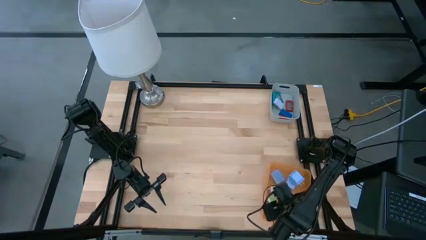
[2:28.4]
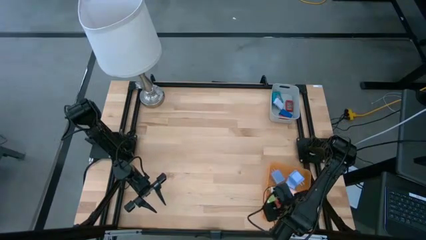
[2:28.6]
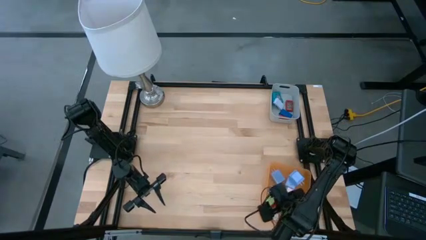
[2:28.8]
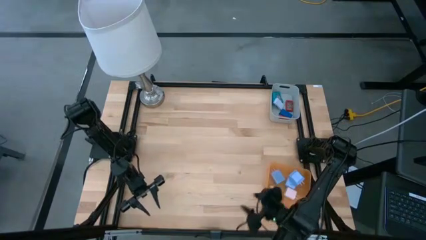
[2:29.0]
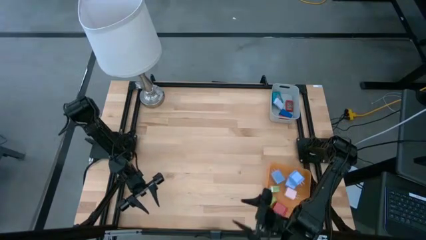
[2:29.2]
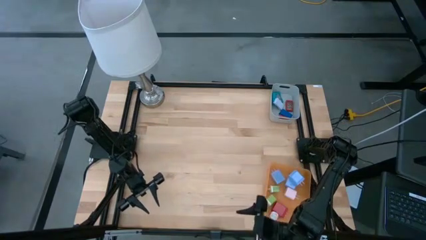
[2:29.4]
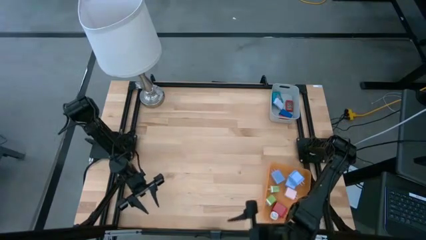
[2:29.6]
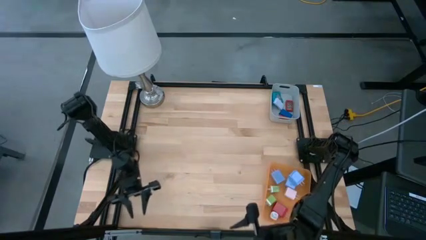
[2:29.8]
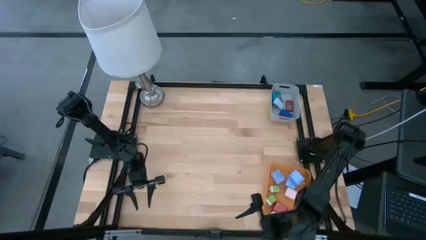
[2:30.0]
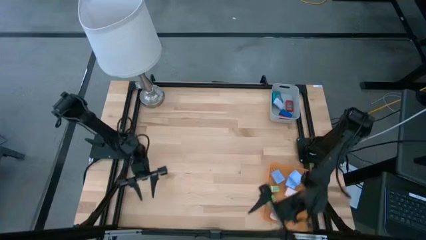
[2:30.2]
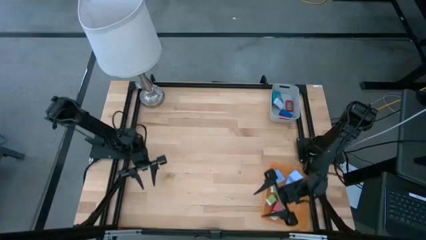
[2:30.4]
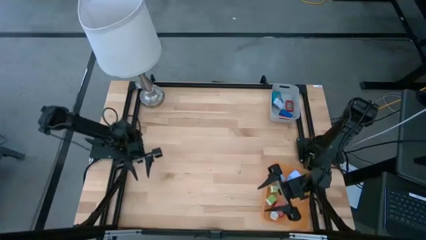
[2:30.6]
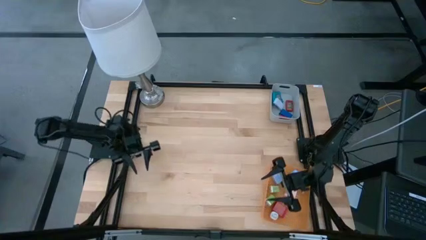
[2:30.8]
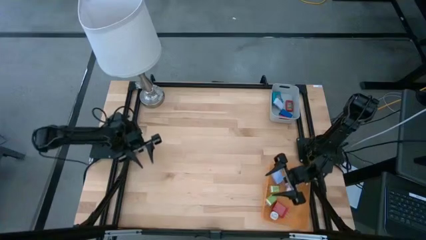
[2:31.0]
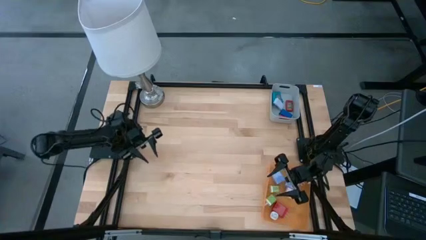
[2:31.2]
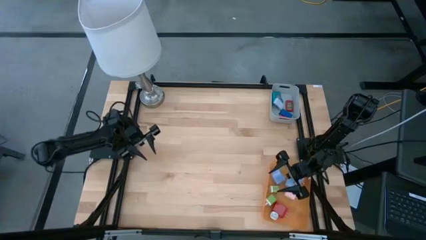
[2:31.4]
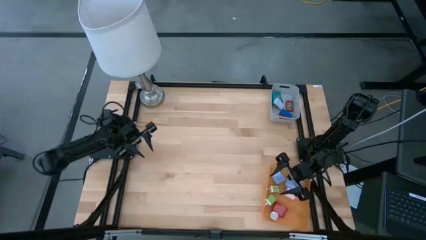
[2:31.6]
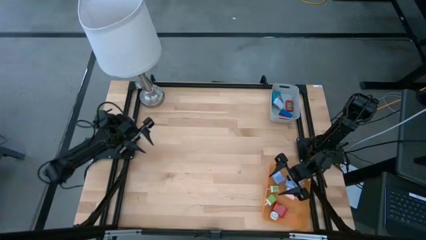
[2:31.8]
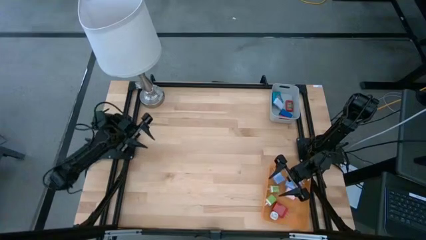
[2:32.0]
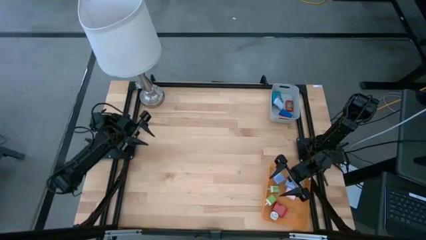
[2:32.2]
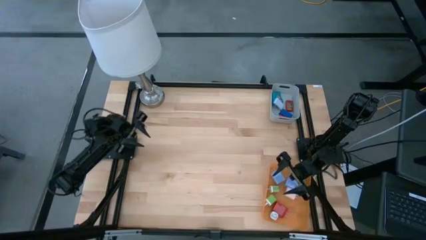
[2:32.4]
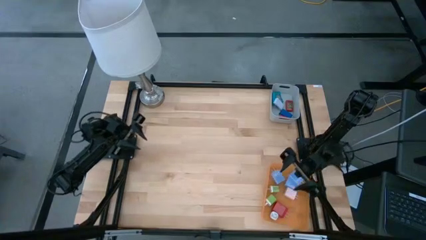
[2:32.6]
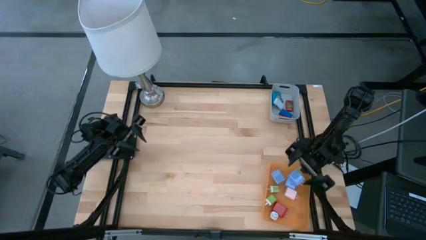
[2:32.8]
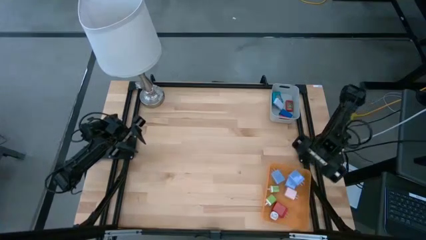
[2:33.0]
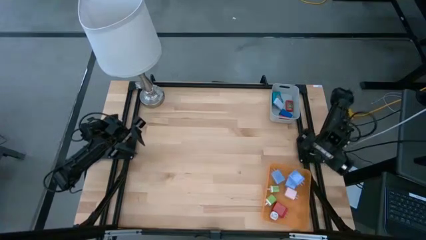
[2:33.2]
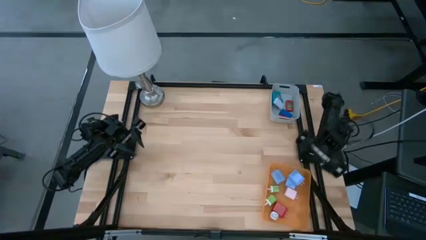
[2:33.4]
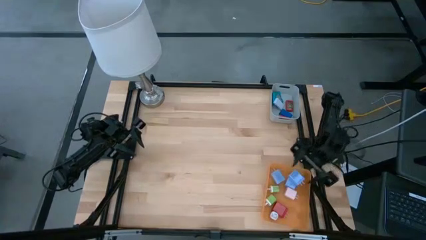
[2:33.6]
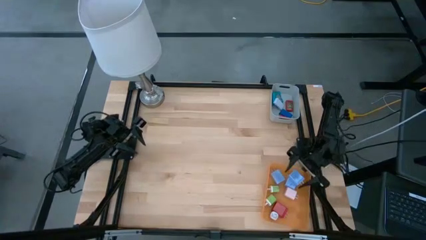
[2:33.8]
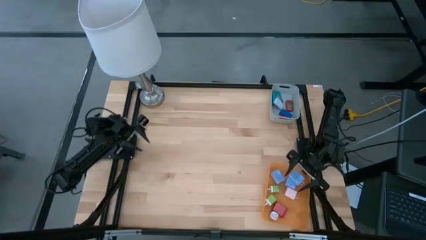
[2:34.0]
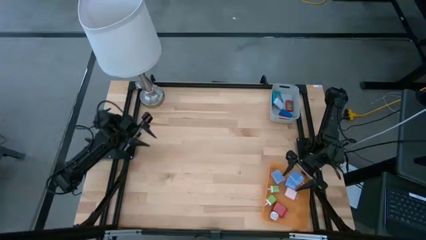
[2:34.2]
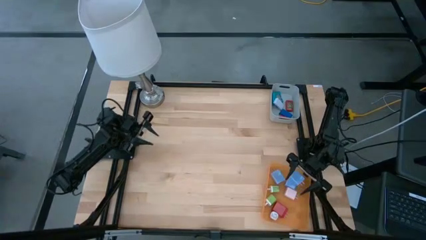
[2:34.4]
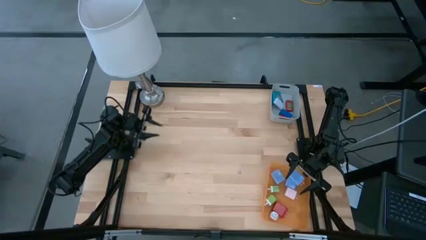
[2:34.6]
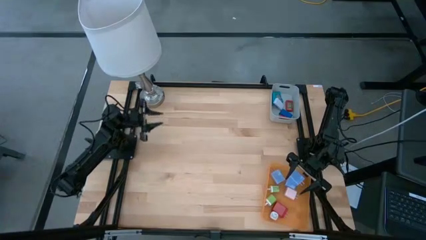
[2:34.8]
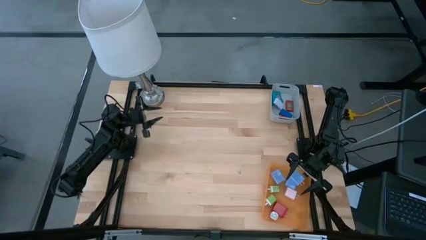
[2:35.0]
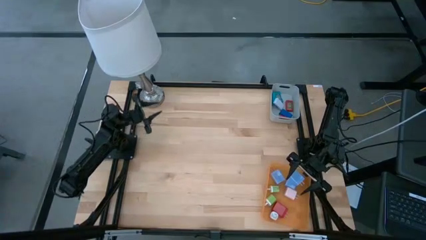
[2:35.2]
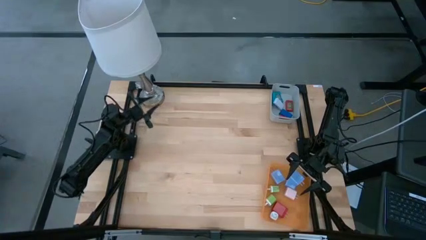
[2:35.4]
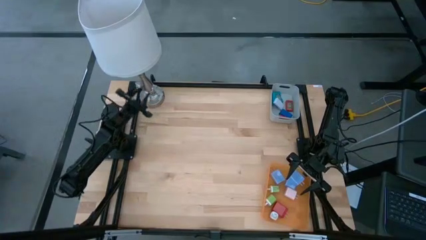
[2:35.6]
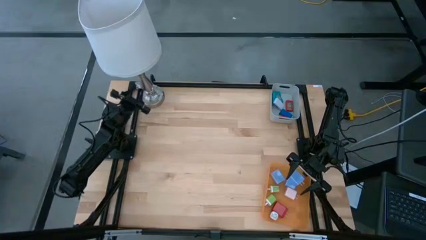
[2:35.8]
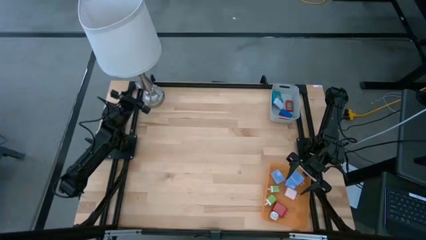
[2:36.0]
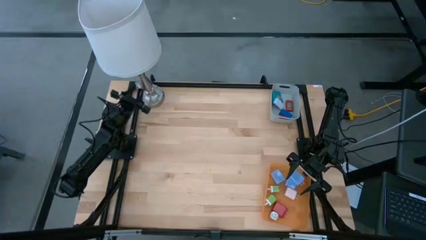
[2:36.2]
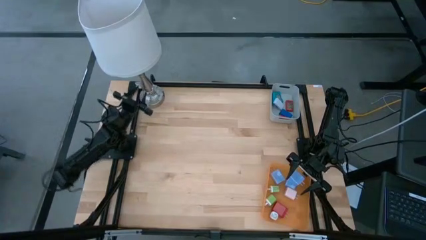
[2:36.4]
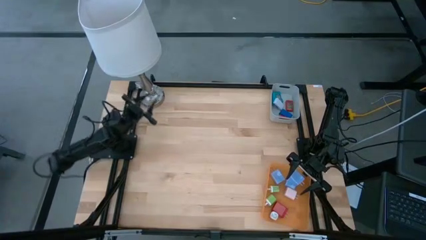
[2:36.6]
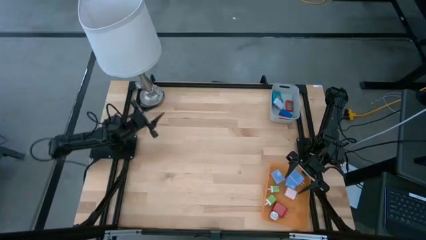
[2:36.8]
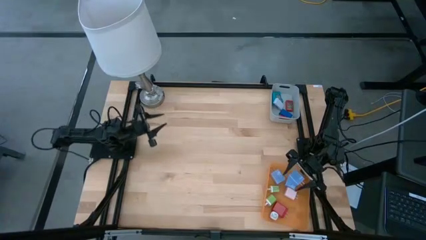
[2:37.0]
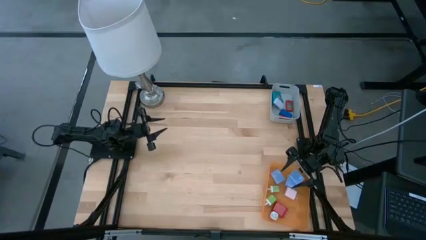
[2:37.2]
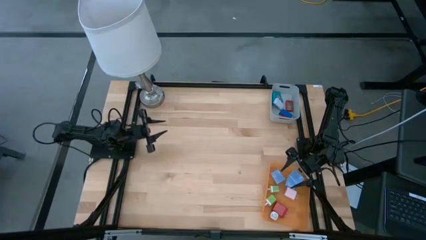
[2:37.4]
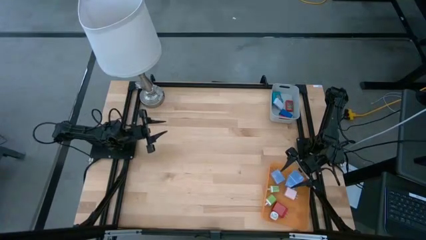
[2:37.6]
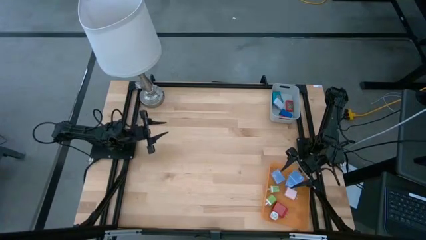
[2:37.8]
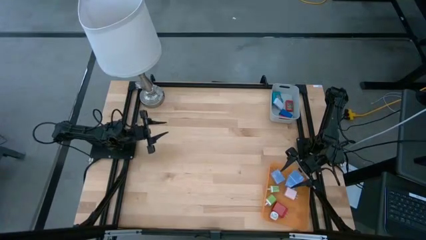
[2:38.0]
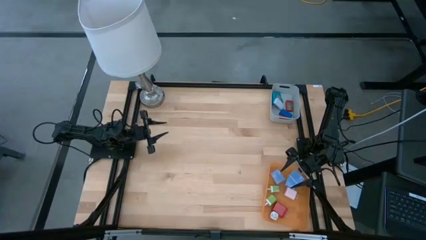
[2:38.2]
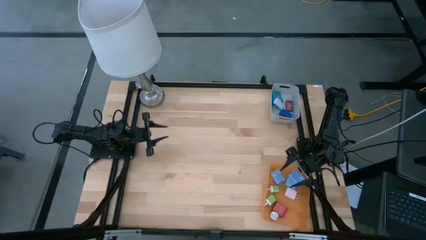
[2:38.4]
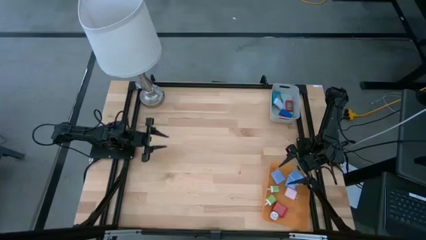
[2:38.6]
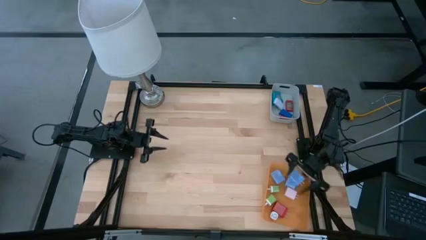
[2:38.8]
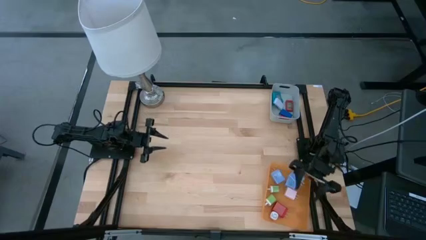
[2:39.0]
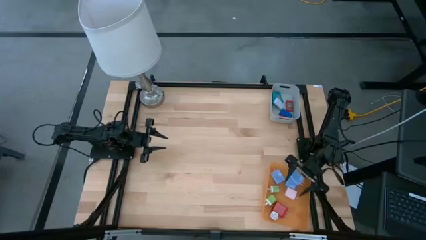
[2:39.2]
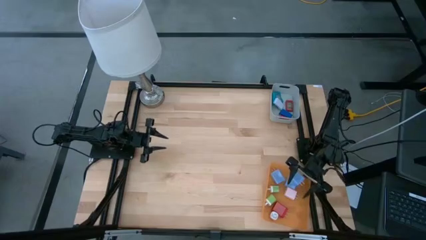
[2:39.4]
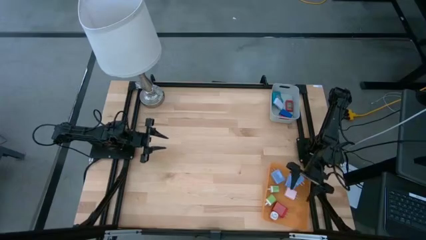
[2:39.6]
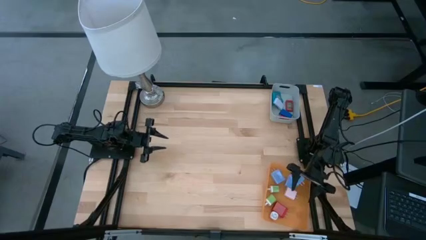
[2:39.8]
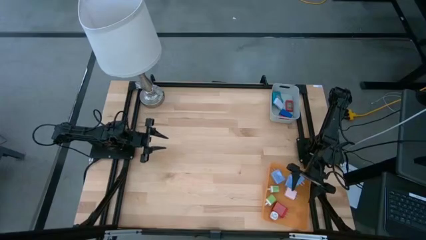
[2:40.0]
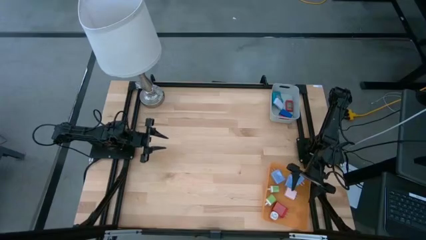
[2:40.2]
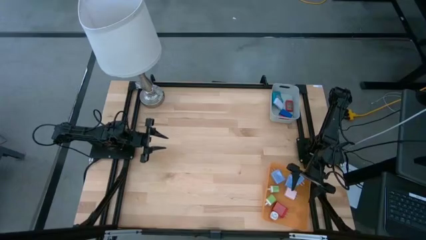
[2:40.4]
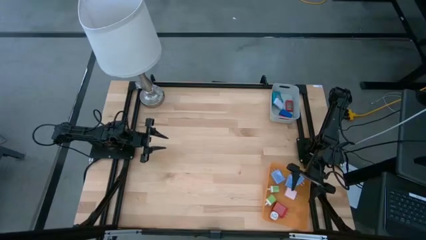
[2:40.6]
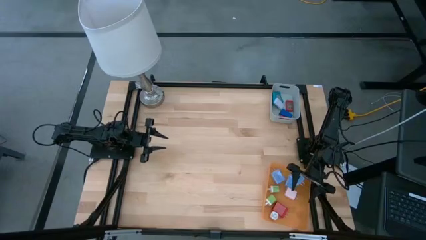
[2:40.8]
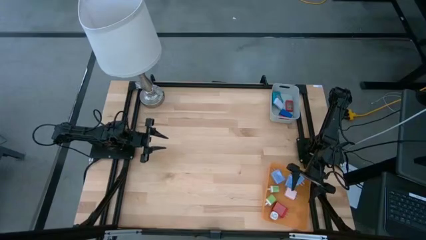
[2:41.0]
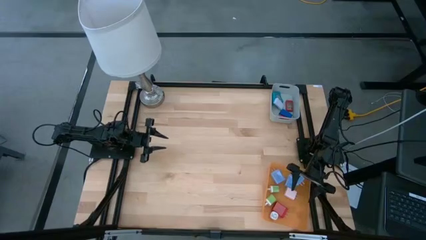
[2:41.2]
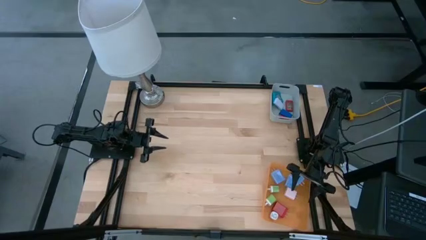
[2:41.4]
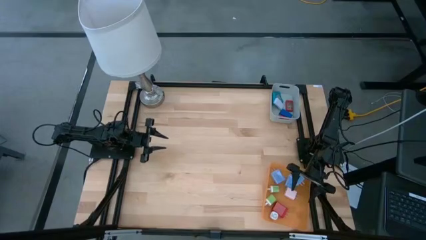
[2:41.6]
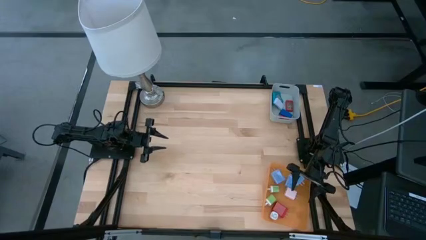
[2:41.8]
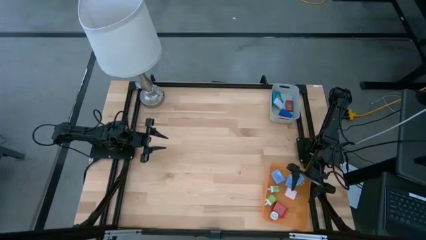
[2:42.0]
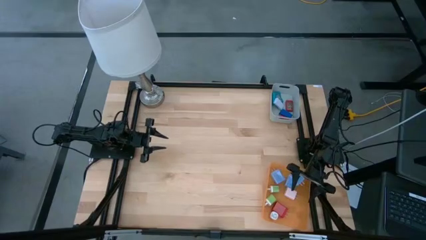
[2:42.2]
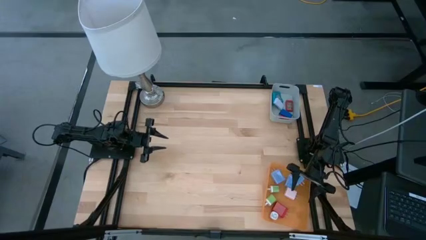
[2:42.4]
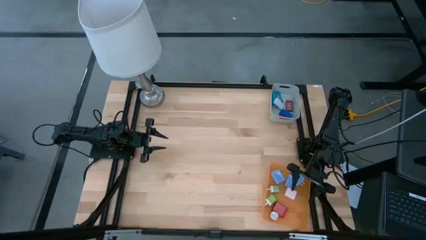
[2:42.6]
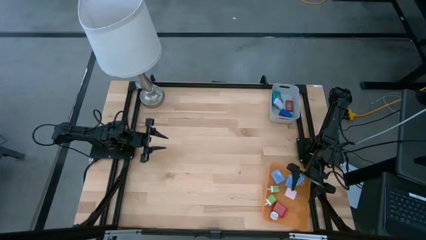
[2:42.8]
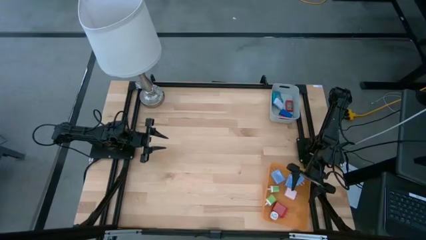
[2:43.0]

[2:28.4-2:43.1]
Task: Pick & Place Office items
Return to Home Position

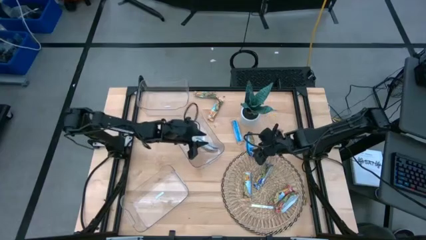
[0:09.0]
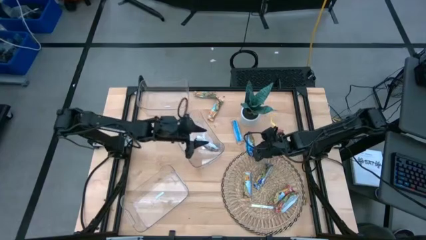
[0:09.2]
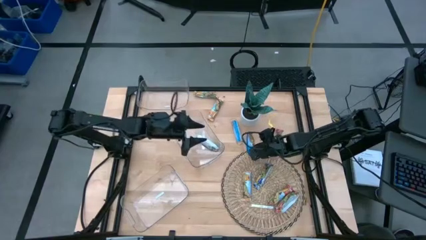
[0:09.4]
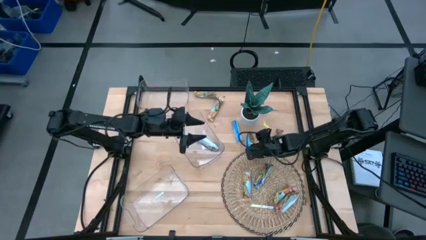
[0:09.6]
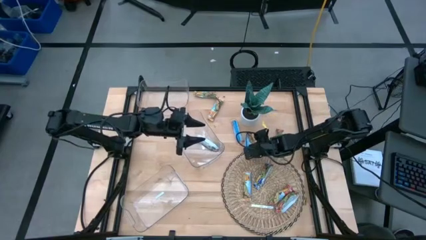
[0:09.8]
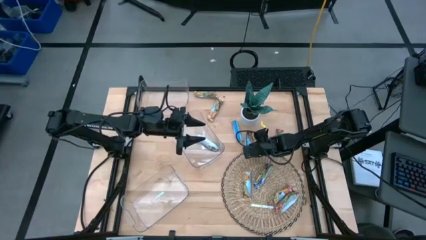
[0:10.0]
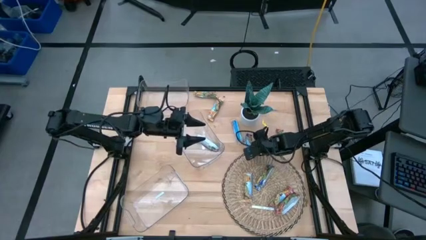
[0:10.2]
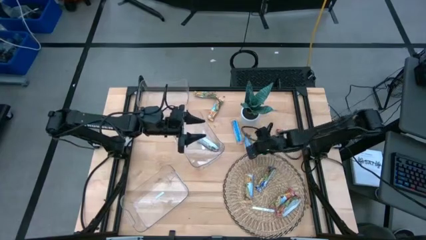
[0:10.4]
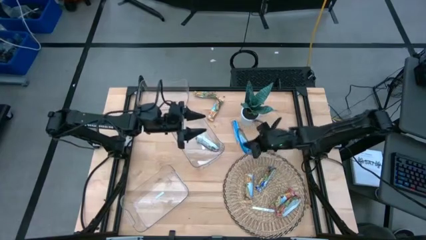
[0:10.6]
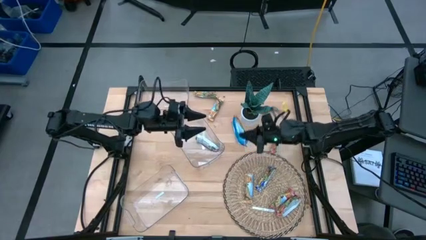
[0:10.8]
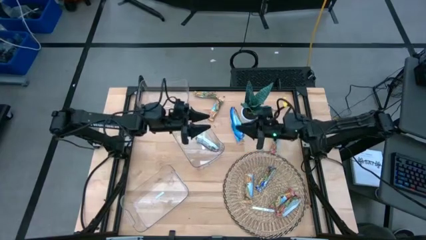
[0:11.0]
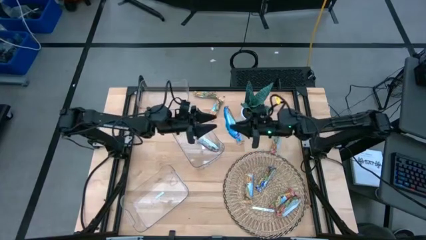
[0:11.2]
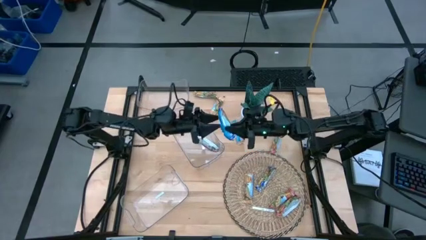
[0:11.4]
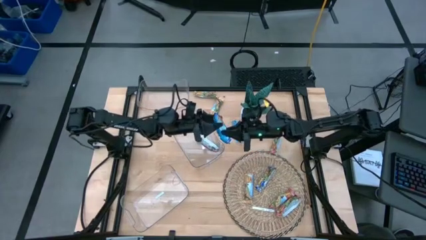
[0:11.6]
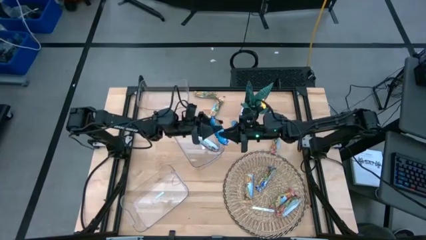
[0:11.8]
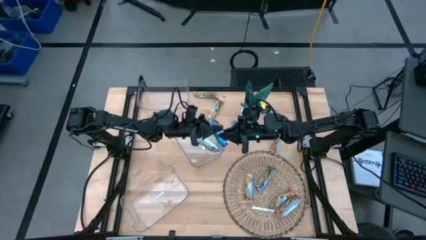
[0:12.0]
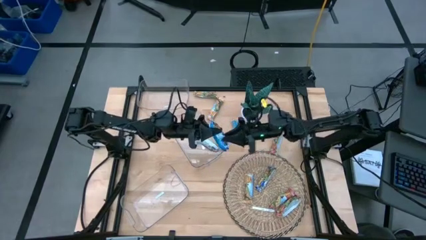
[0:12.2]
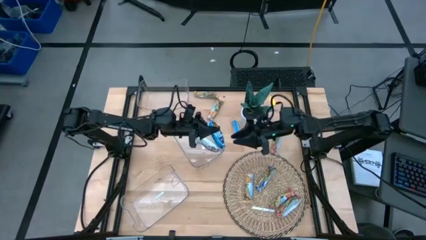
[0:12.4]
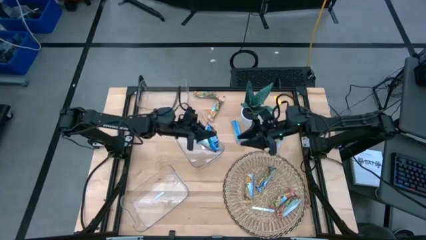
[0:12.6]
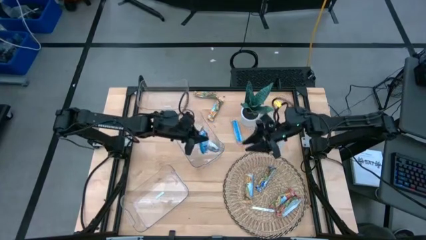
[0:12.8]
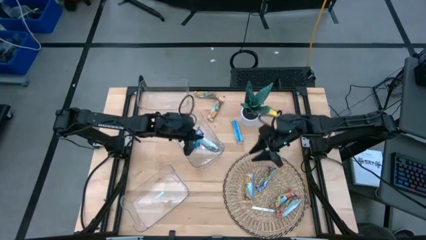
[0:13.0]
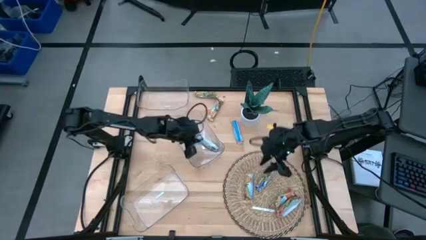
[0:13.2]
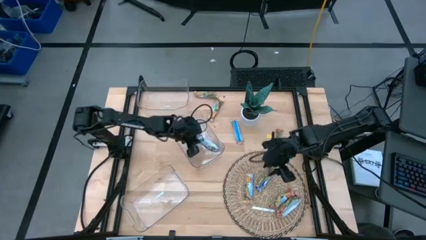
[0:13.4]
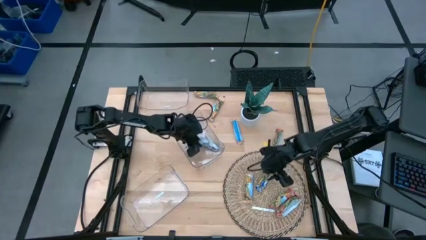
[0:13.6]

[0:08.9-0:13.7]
Task: Pick and place Granola Bars by type
Put the blue granola bar into the middle transparent bin
